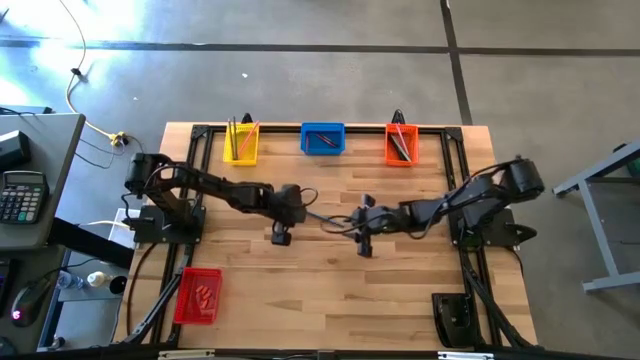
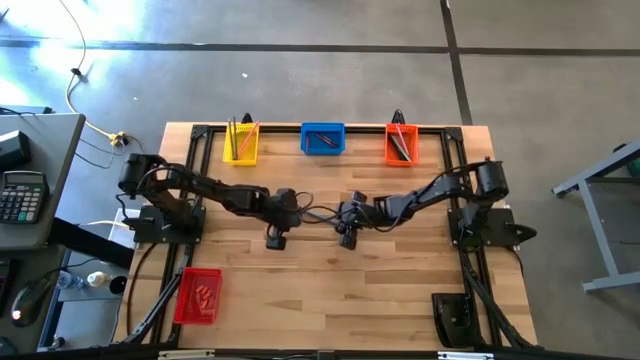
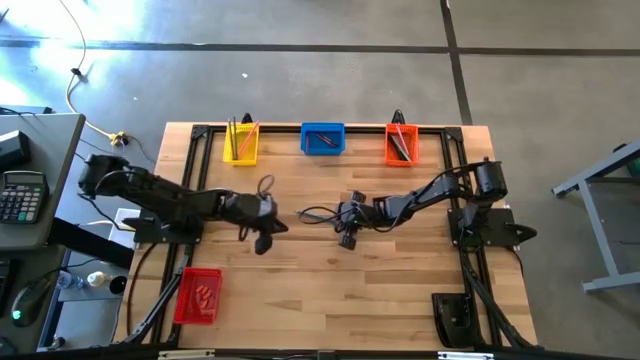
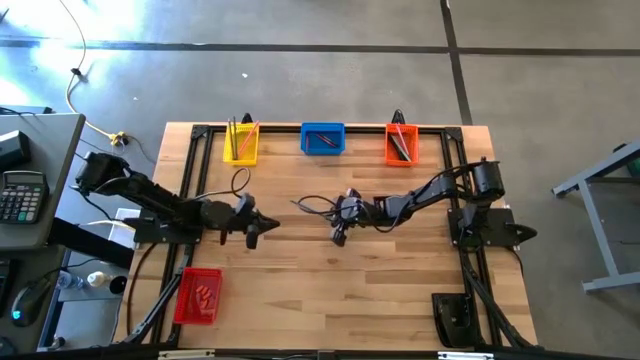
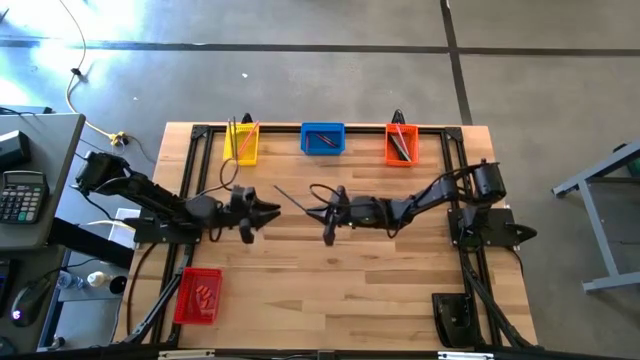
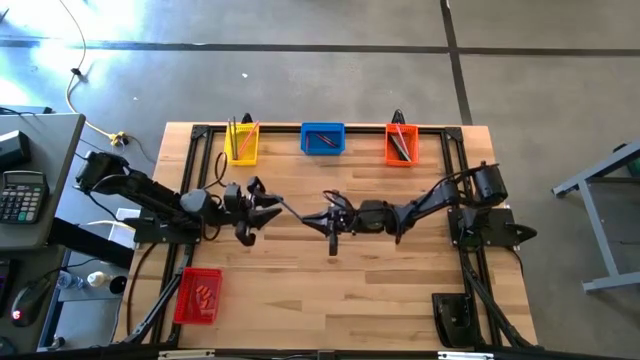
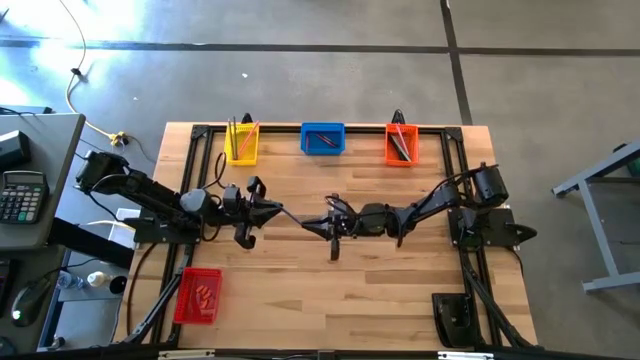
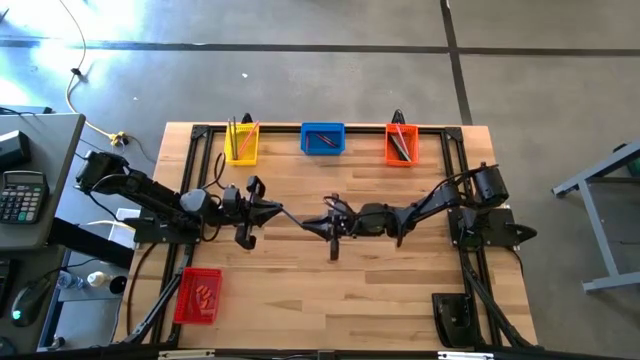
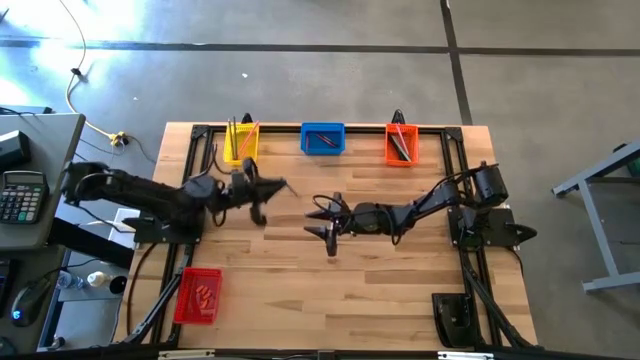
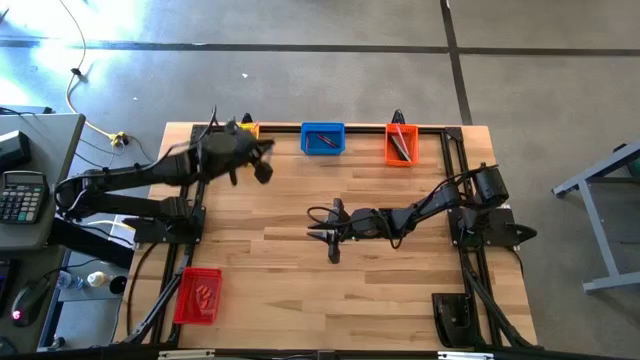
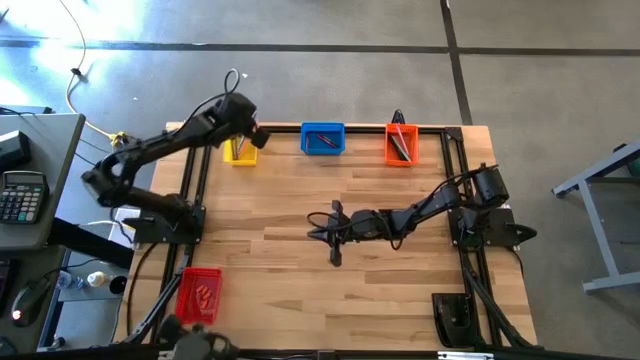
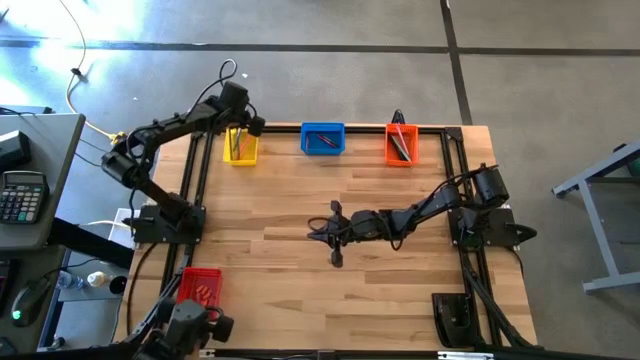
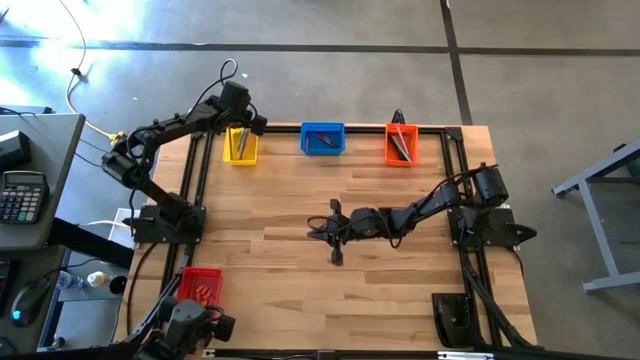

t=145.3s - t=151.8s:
Task: Sort crayons/erasers/pens/pencils in bins
Put the blue colored pencil into the yellow bin

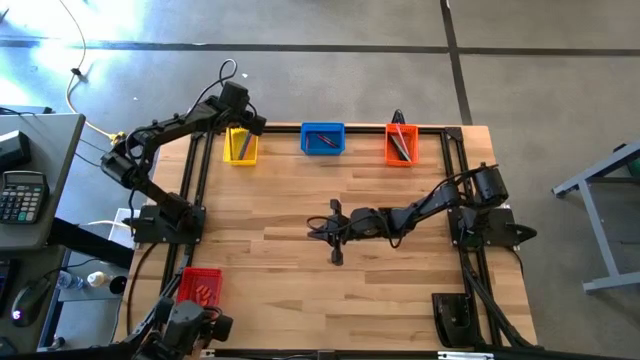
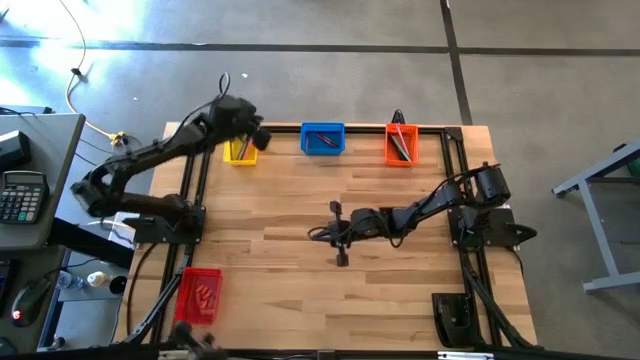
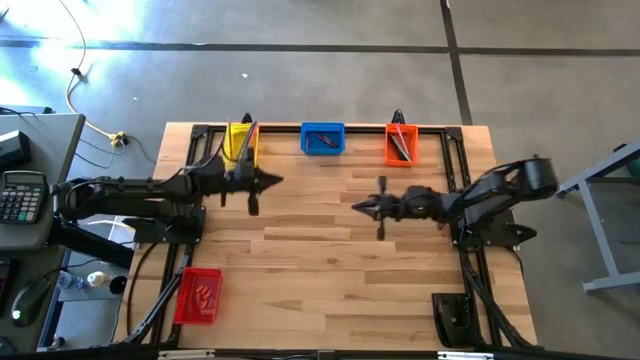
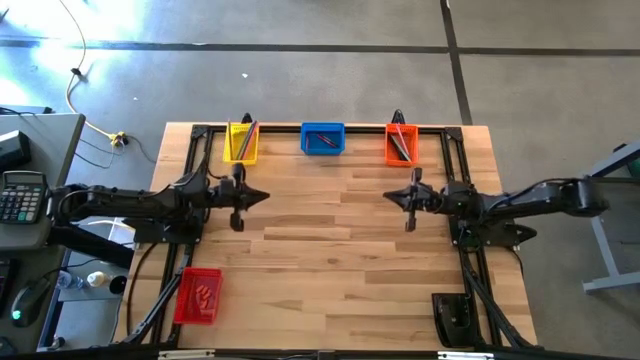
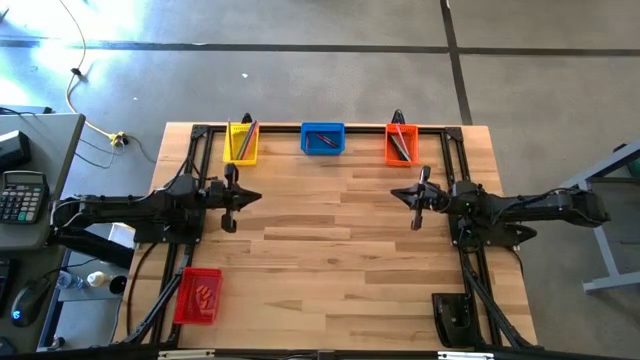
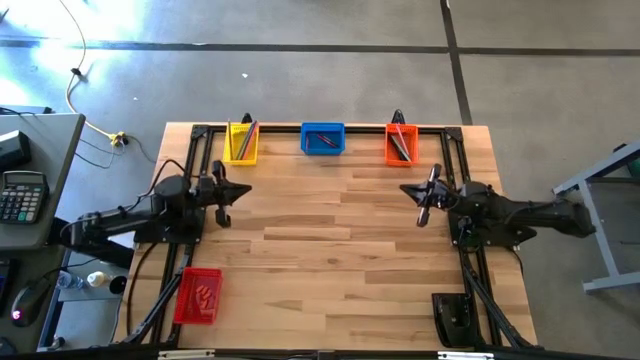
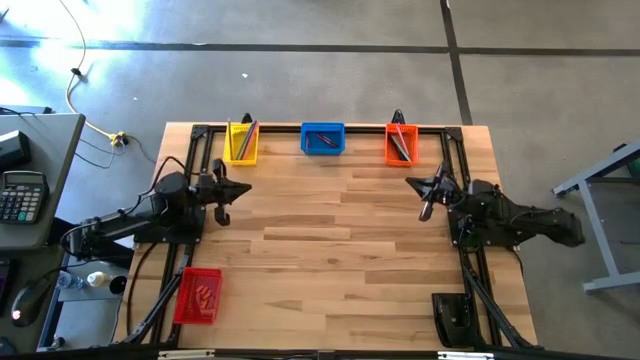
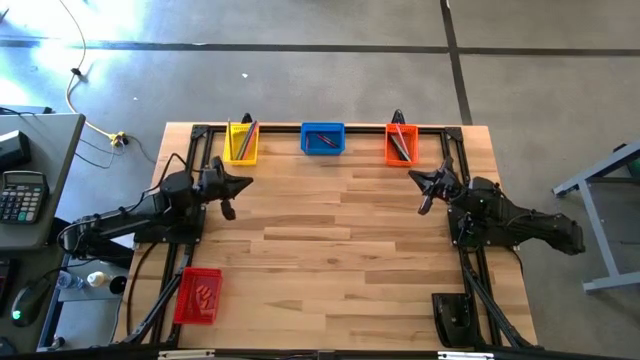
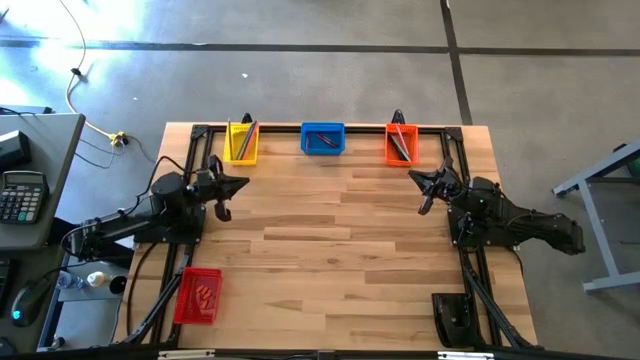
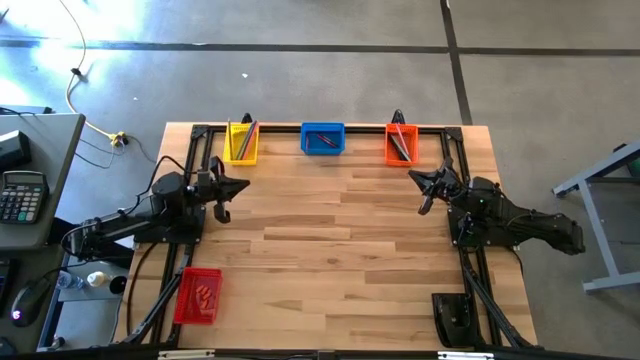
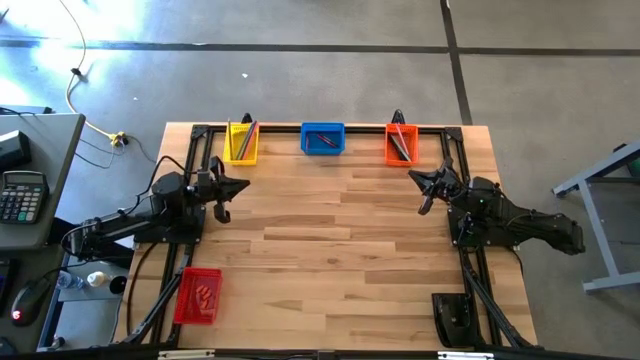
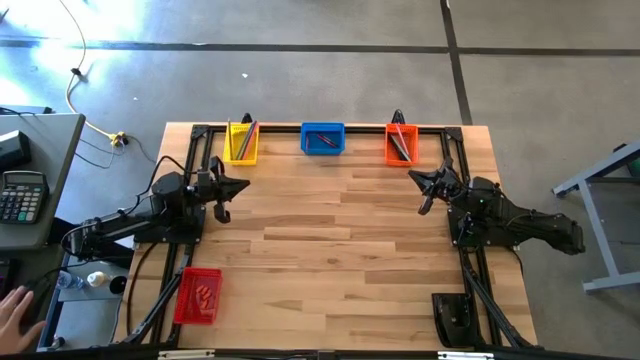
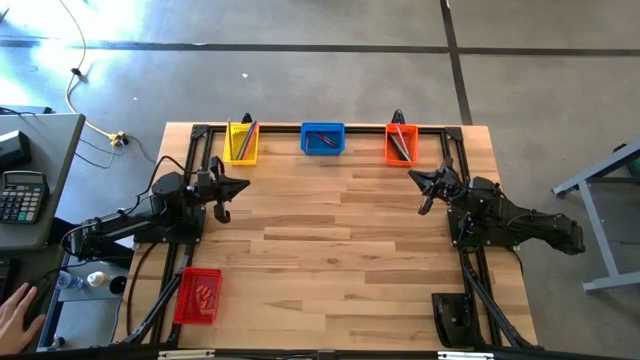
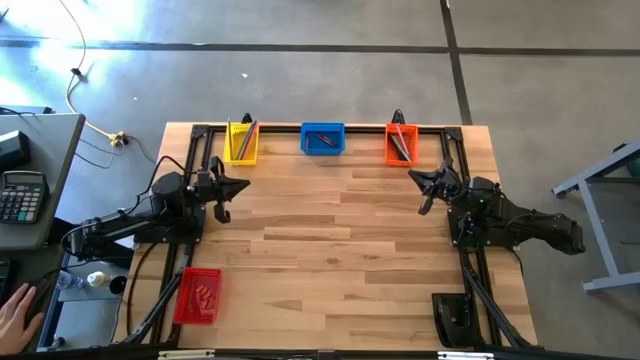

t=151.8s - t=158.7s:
Return to Home Position

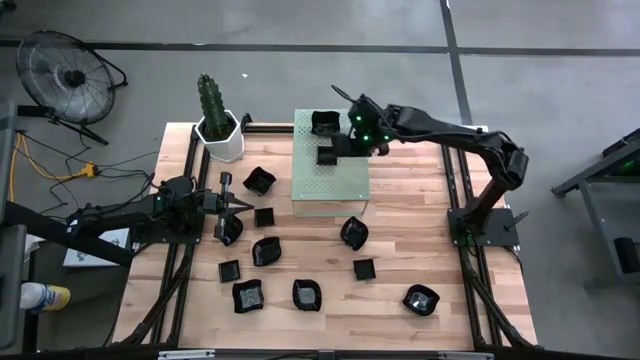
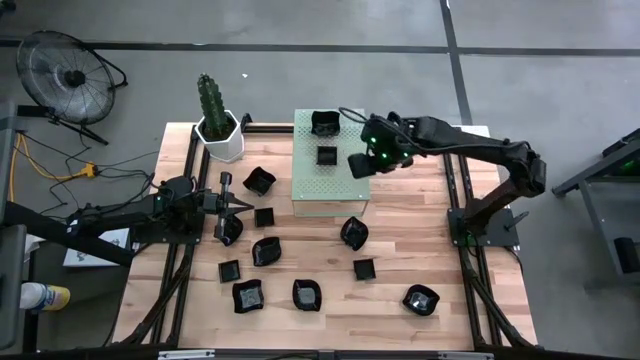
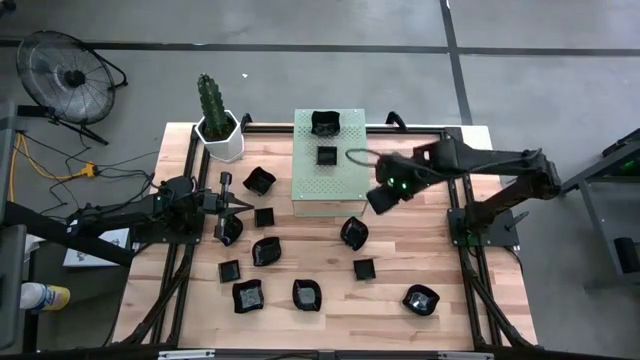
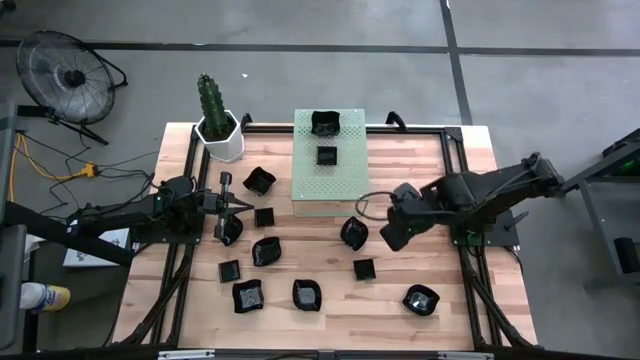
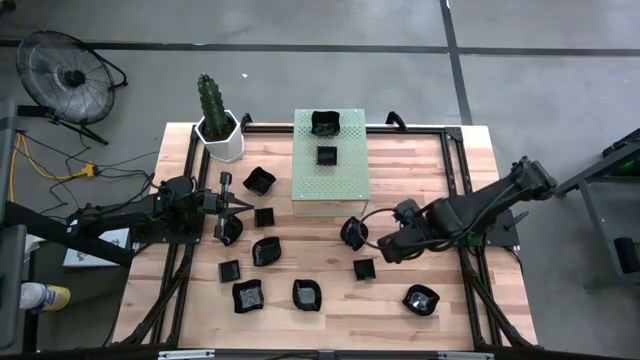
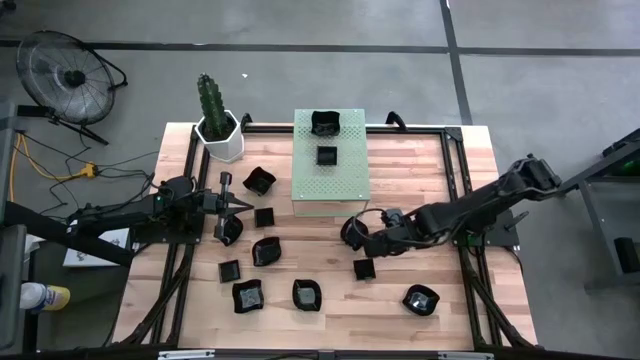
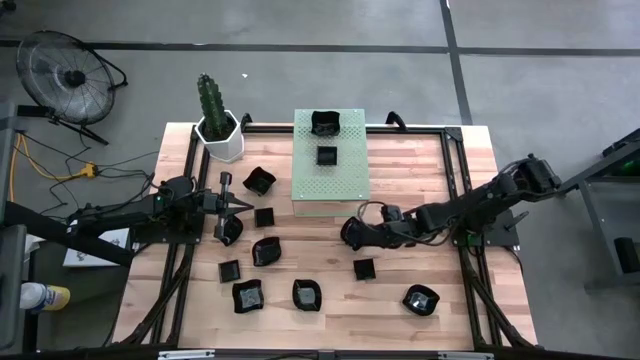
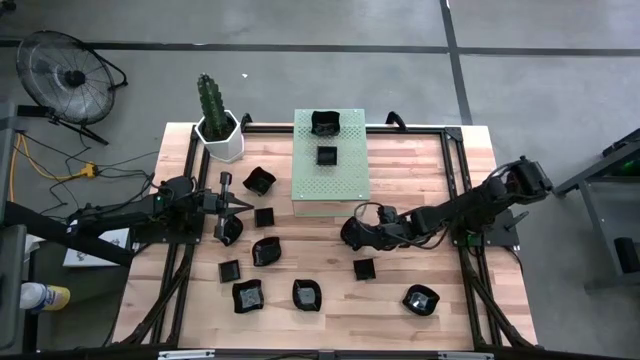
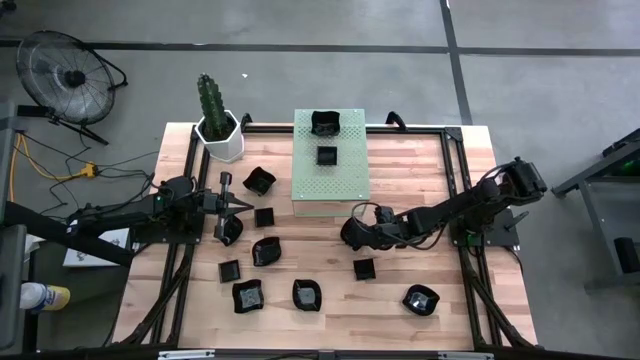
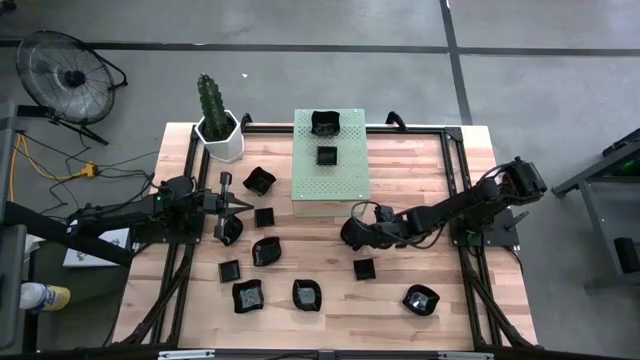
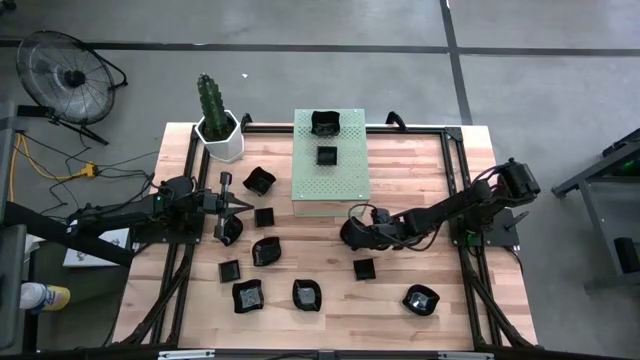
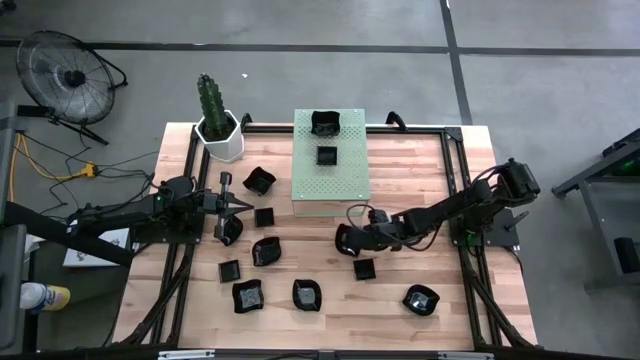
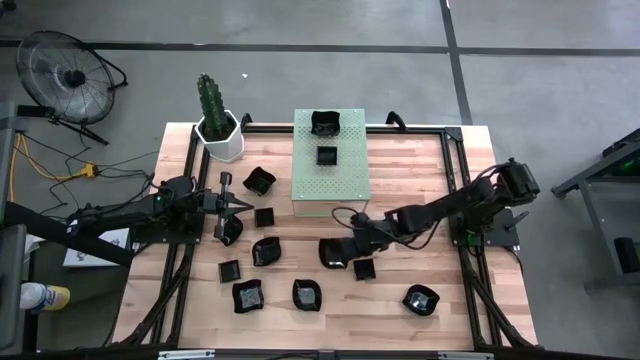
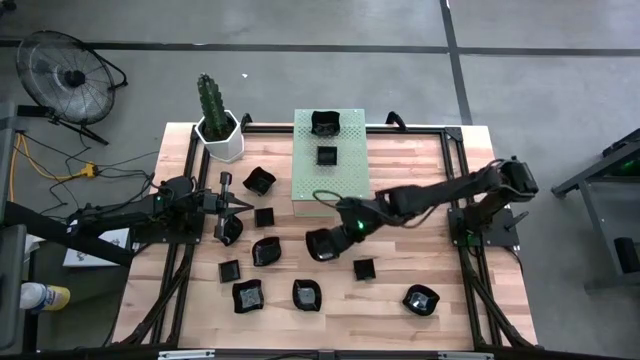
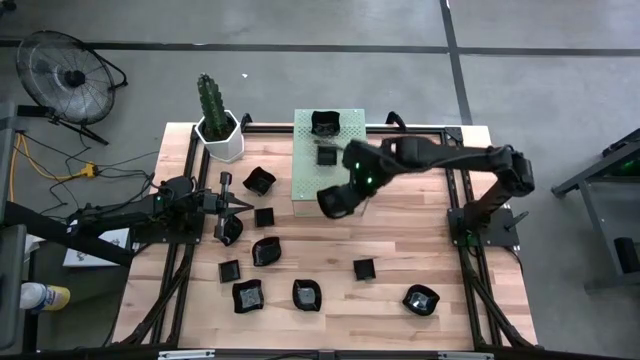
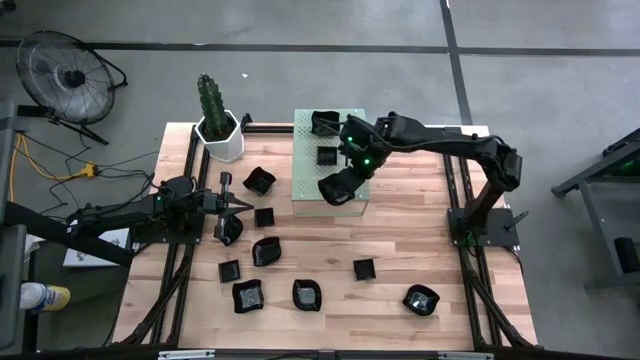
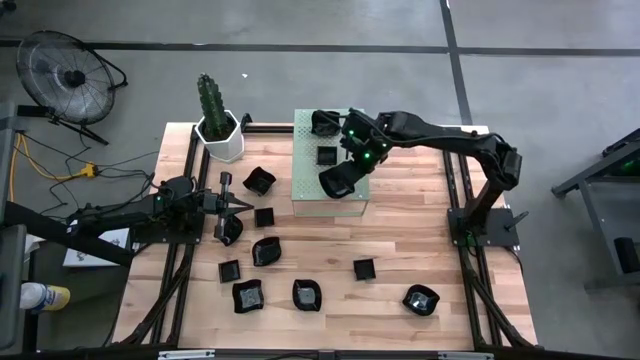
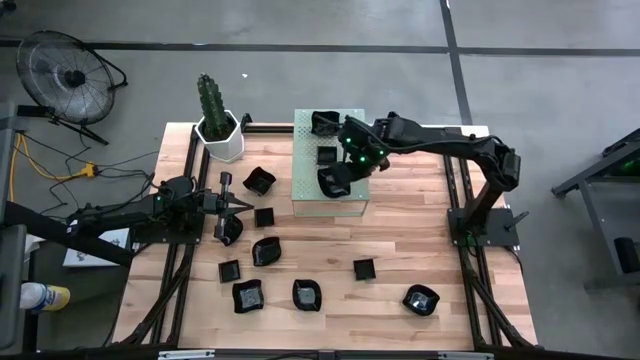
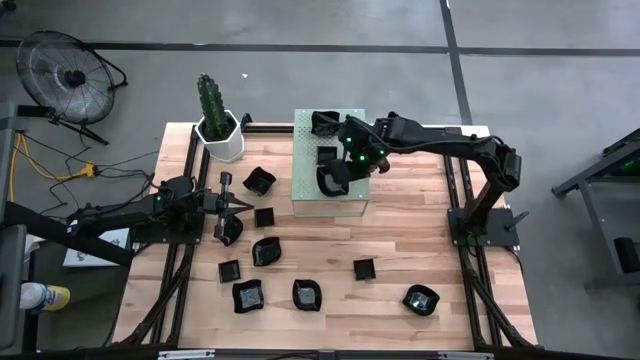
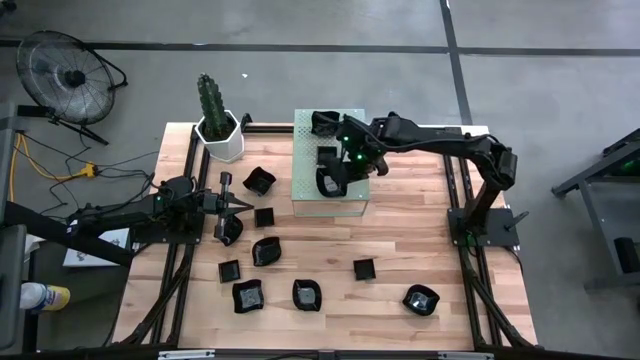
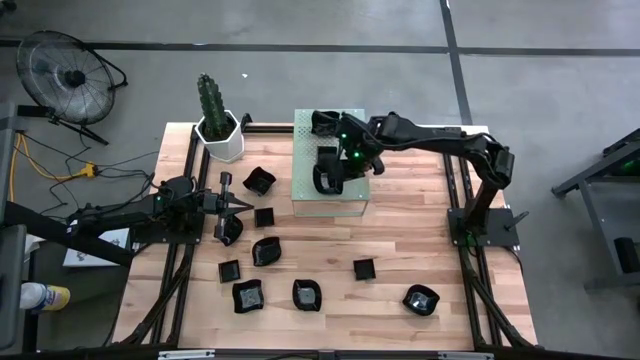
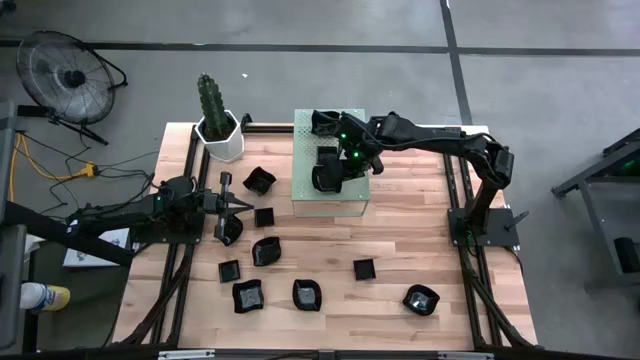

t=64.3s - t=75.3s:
Task: Pick & Place Mini shaped plates
Put the black leaf shaped plate on the shelf
